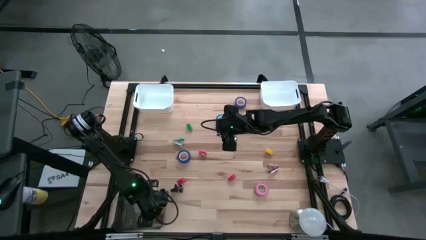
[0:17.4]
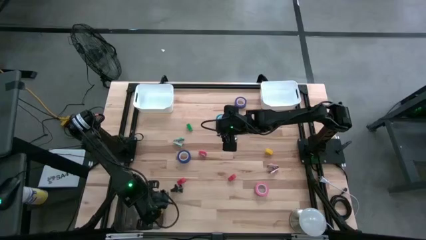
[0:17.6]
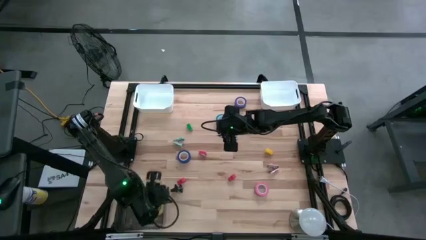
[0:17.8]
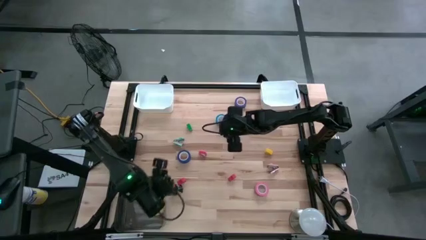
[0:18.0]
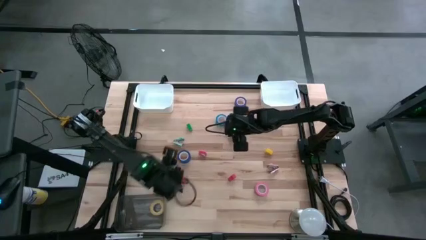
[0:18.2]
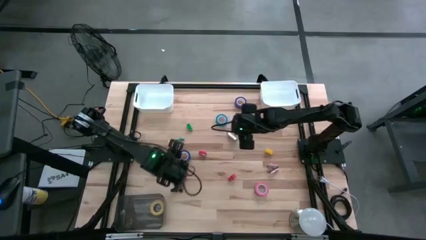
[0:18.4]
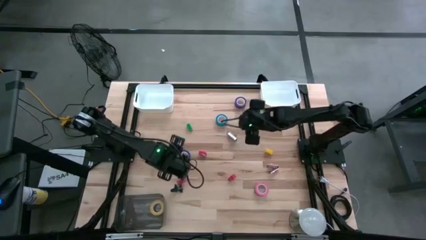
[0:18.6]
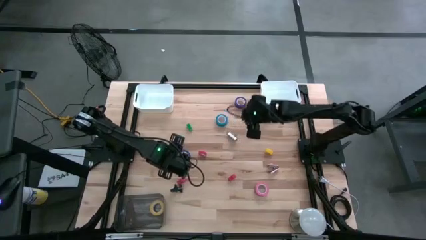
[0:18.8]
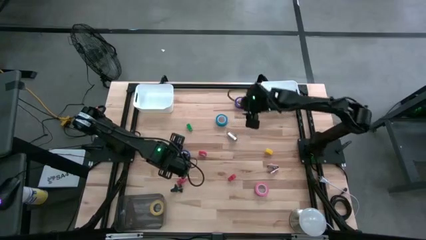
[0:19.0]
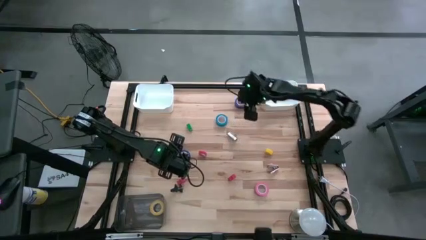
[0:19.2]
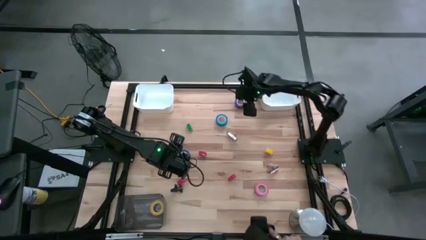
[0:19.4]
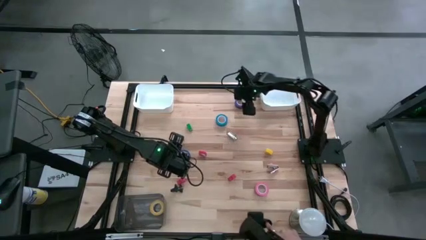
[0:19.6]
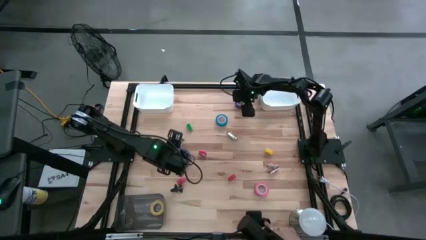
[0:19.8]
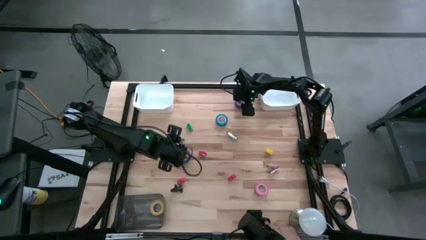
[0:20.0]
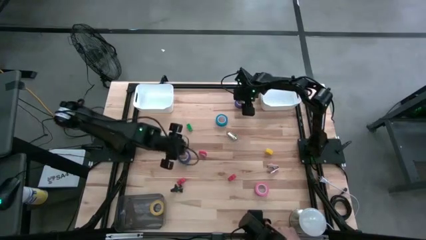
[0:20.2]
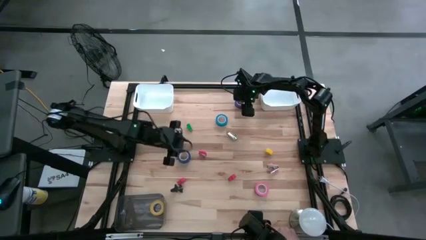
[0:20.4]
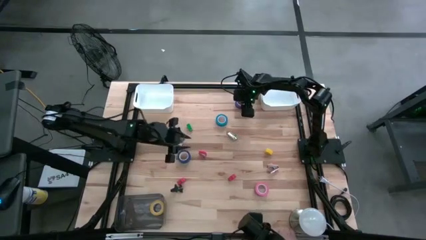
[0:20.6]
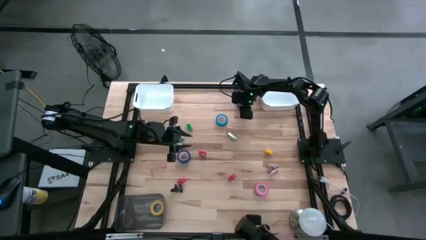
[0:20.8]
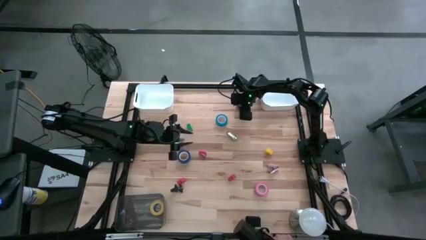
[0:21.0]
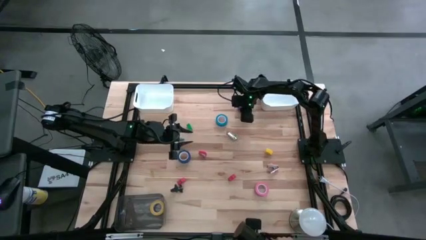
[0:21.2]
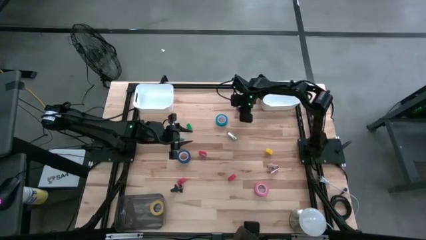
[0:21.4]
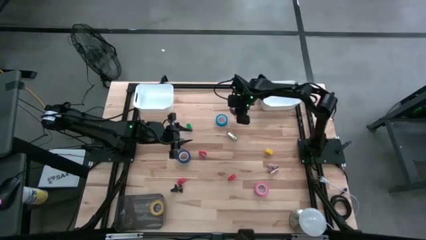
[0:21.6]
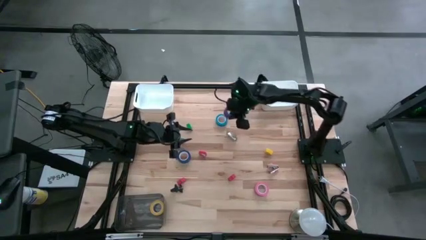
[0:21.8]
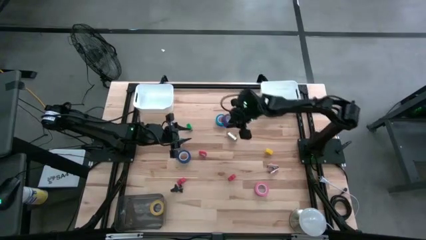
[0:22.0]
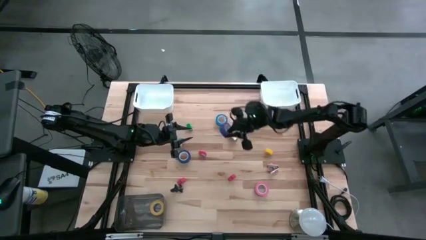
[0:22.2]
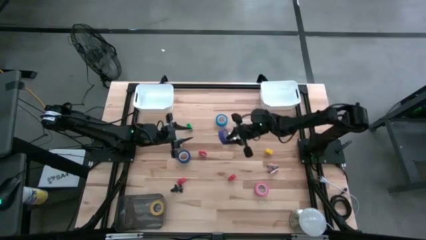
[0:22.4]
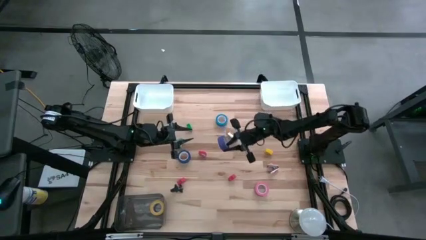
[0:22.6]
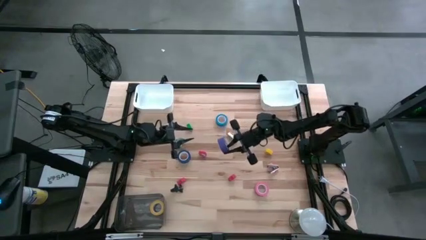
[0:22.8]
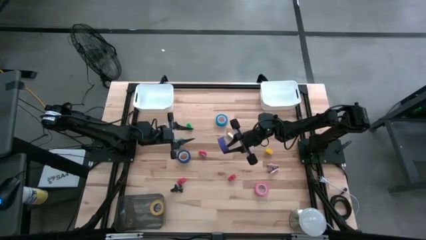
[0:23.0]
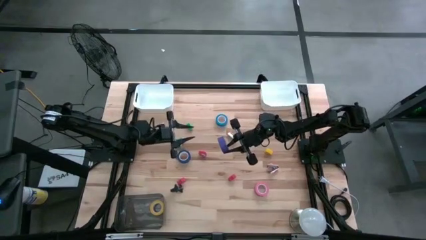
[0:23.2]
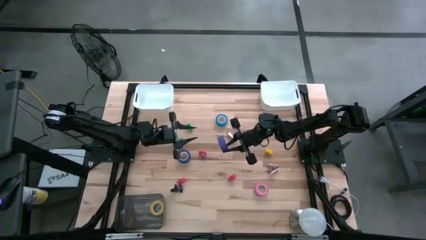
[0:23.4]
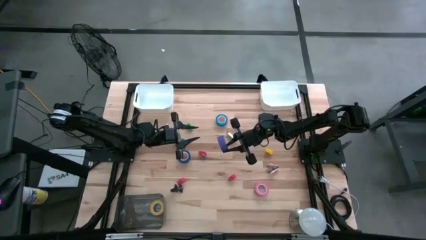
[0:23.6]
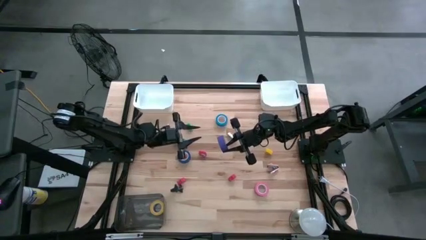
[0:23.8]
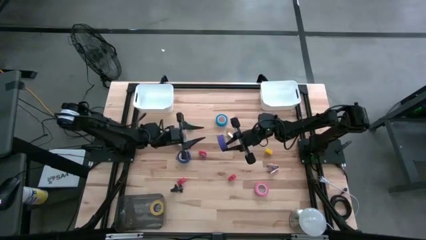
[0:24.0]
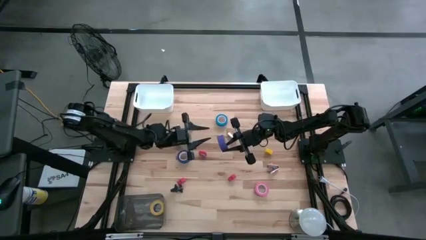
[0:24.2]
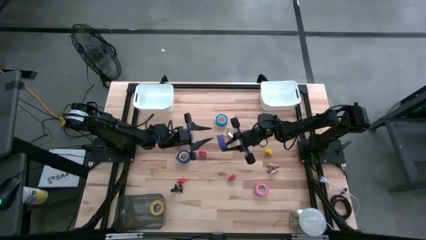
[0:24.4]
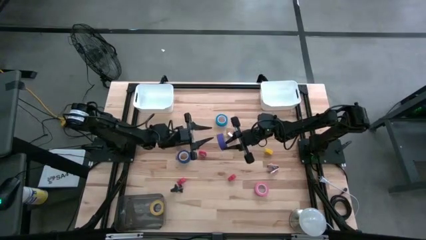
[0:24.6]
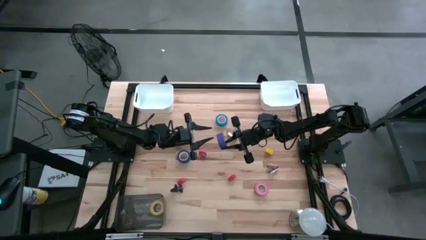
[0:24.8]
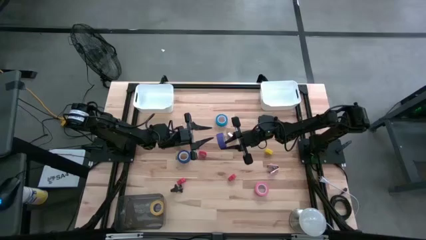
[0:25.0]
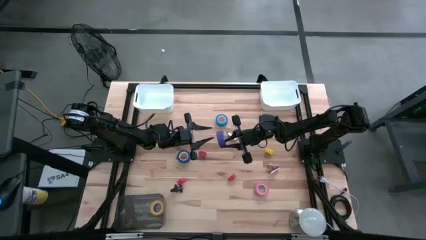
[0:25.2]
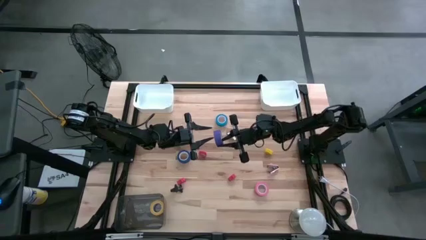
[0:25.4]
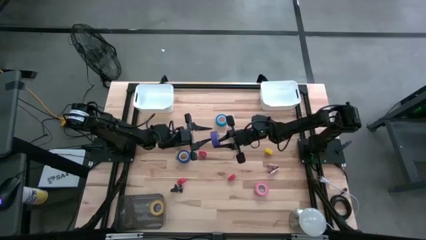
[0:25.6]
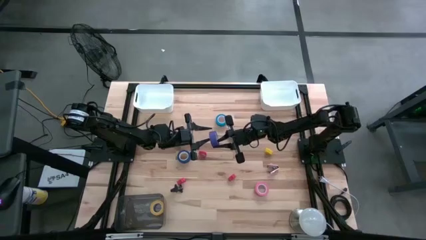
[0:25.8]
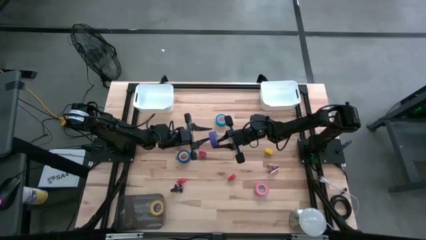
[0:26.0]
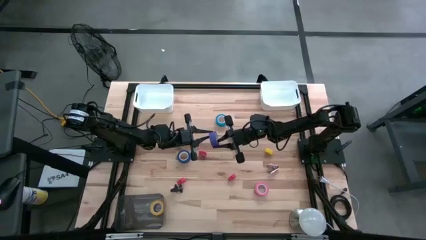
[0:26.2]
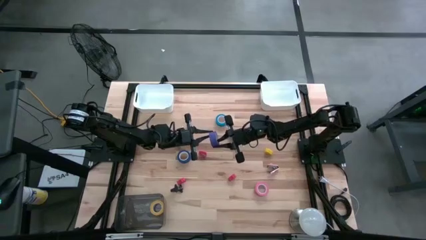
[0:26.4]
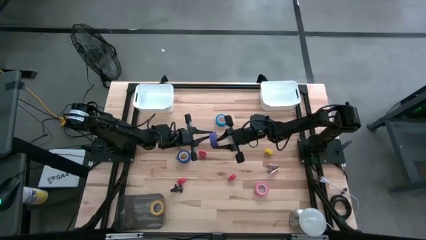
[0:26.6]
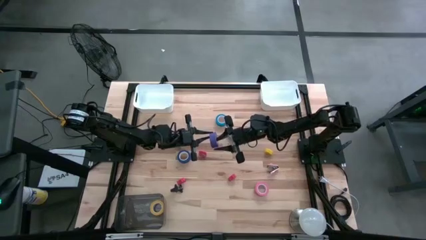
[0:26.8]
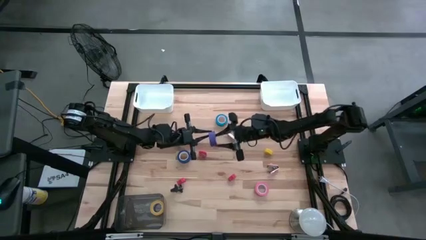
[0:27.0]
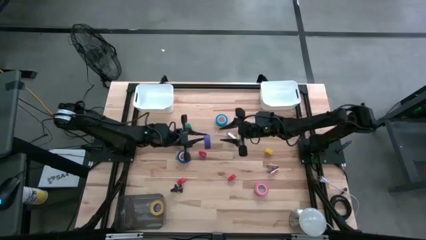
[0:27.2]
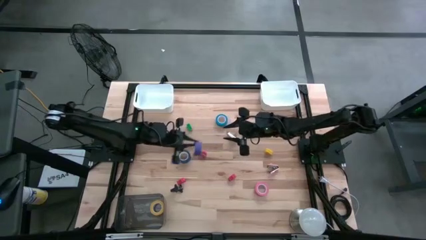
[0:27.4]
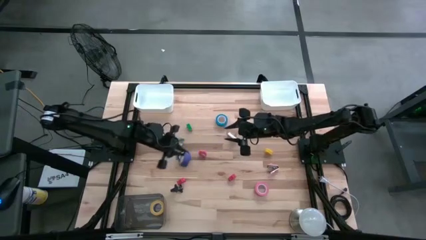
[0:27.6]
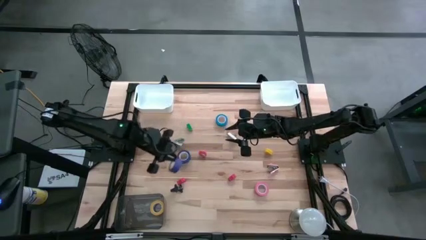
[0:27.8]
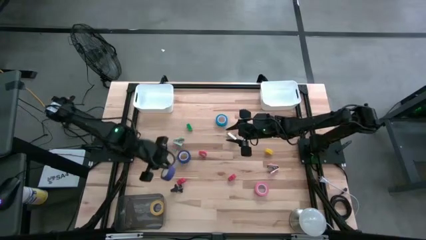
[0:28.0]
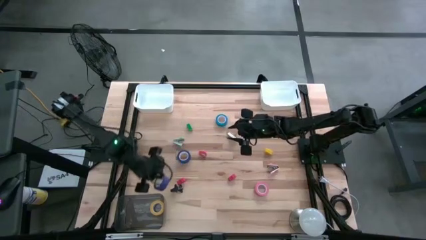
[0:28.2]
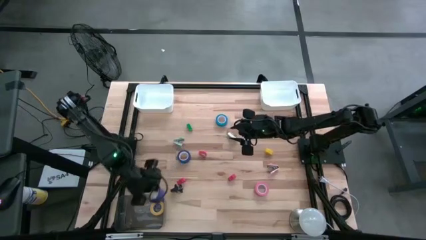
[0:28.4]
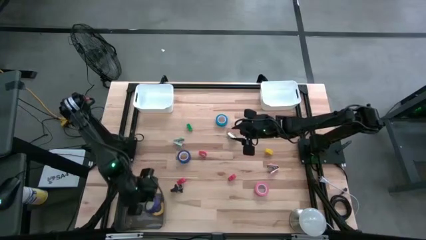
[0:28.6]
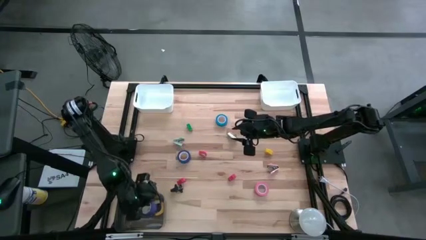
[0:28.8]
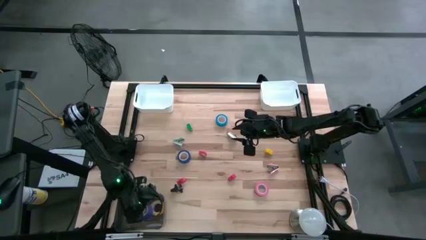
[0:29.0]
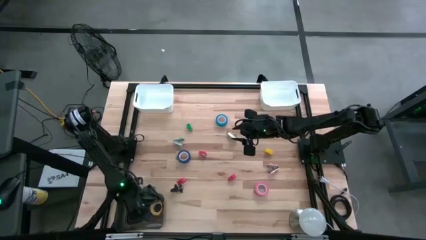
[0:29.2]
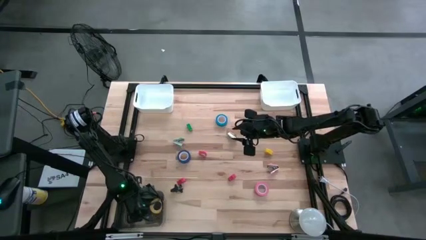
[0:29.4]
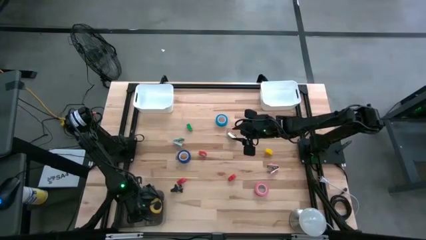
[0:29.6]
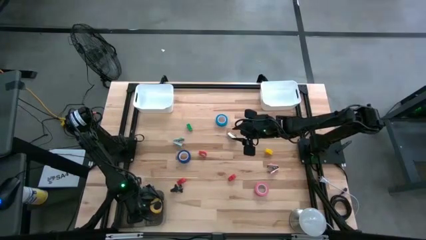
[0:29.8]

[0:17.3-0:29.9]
Task: Pick and place Stapler, Stapler remover, tape
Put the purple tape into the black bin
